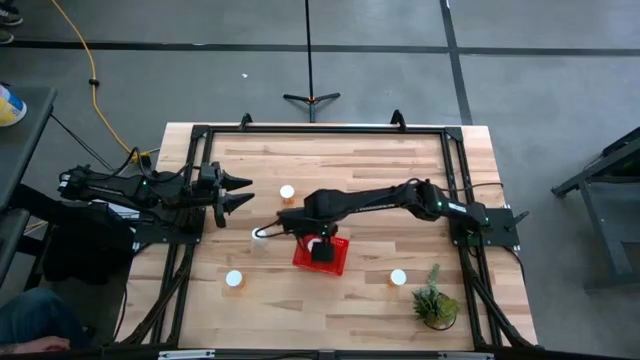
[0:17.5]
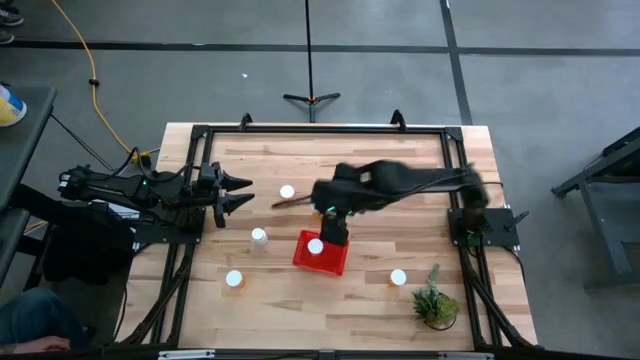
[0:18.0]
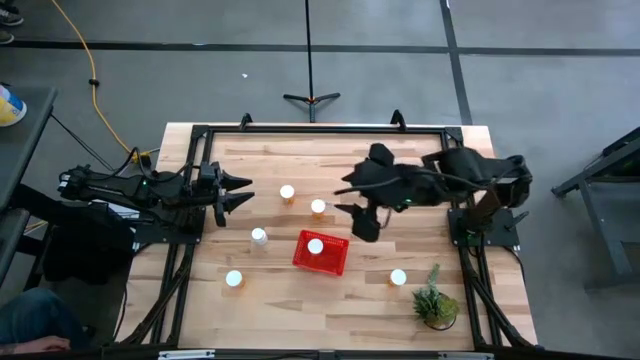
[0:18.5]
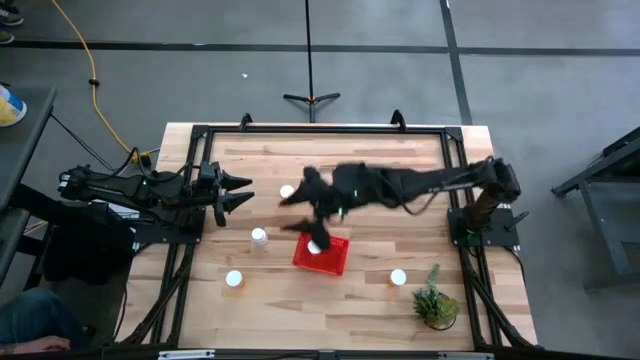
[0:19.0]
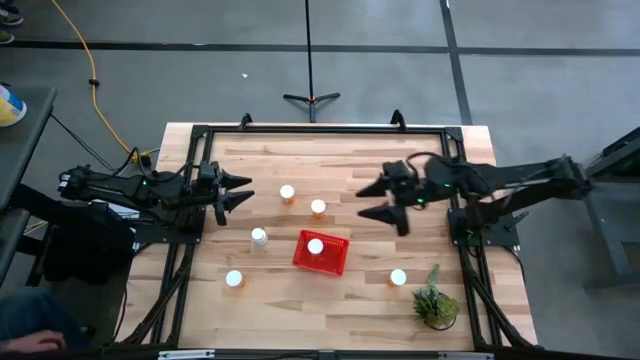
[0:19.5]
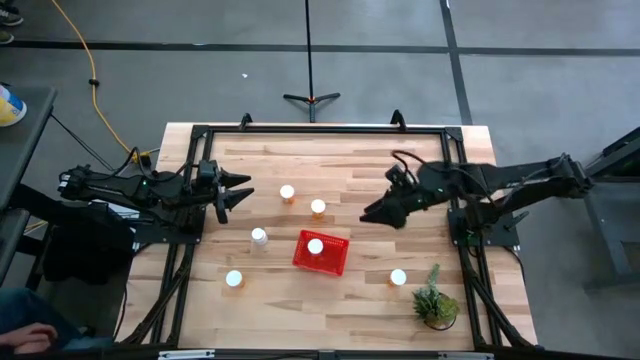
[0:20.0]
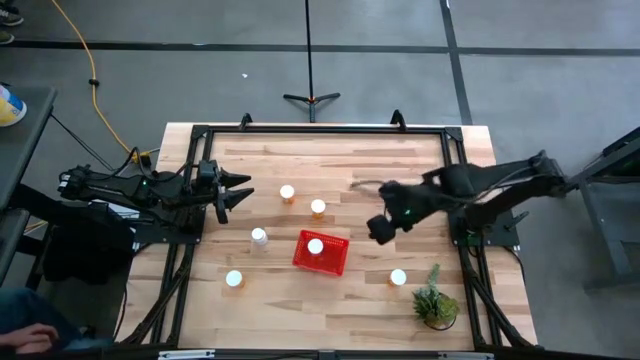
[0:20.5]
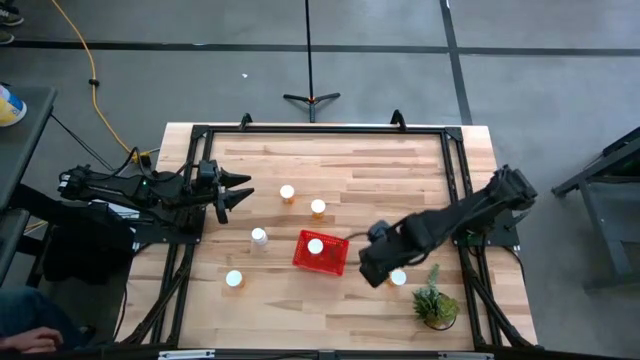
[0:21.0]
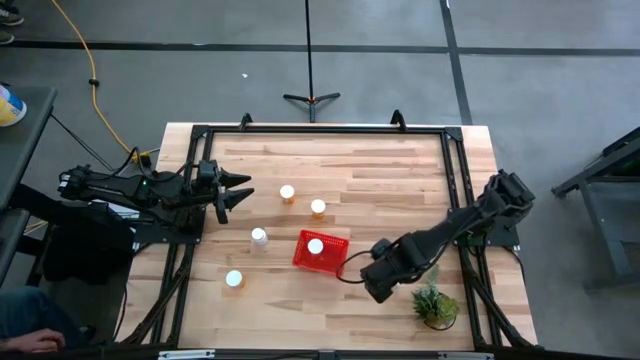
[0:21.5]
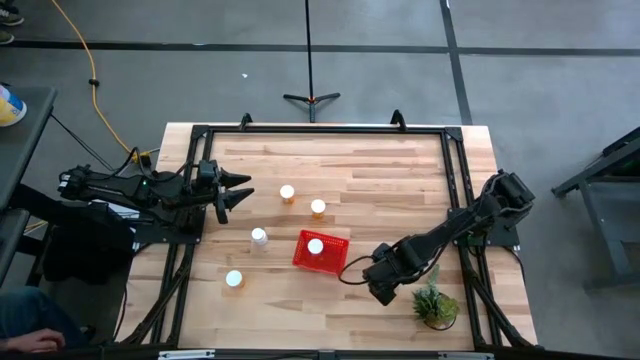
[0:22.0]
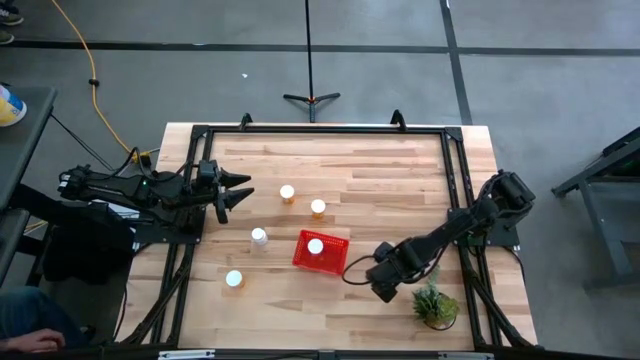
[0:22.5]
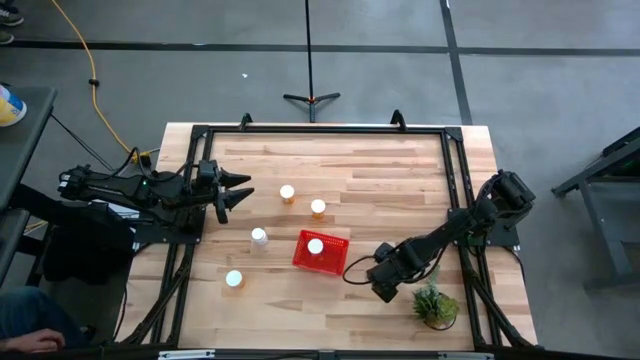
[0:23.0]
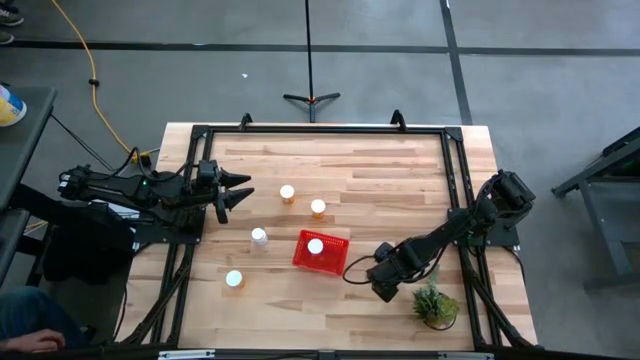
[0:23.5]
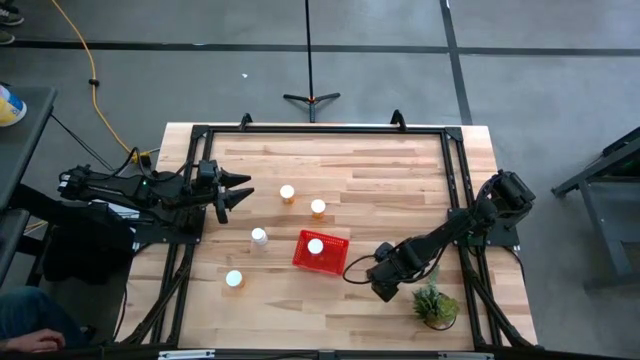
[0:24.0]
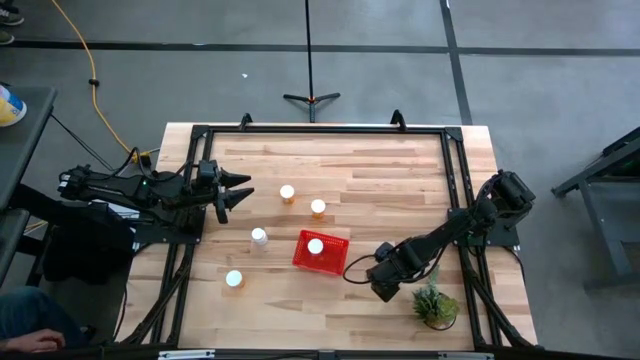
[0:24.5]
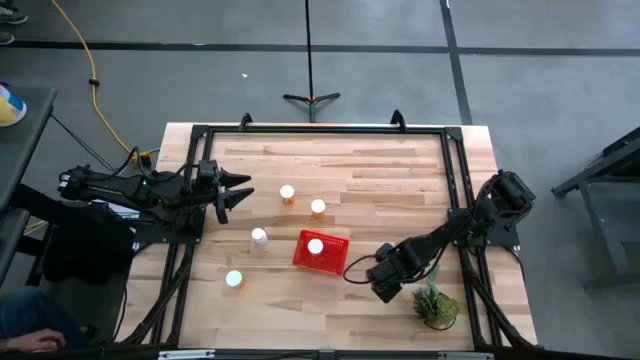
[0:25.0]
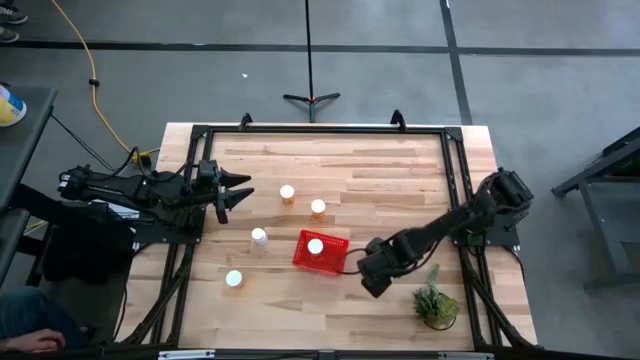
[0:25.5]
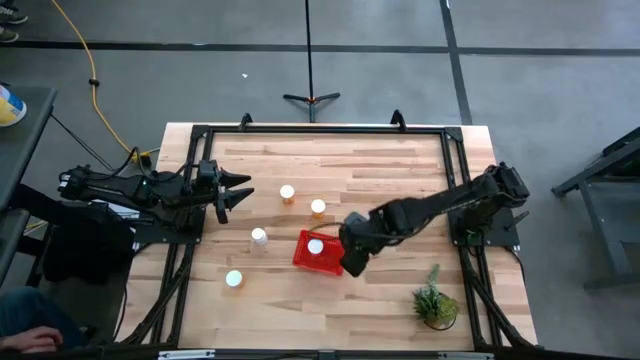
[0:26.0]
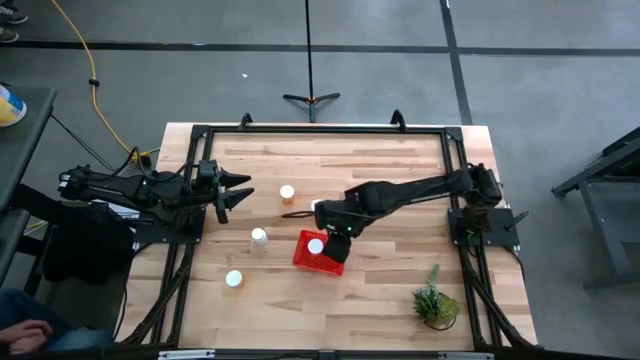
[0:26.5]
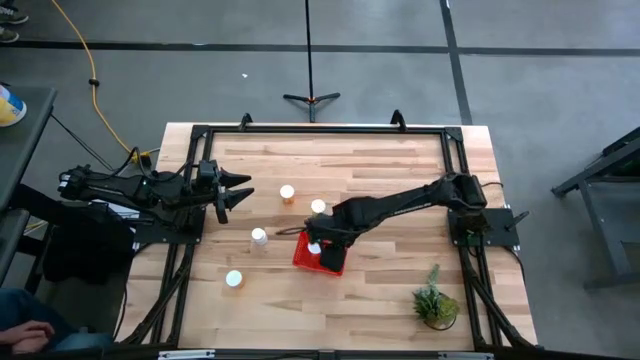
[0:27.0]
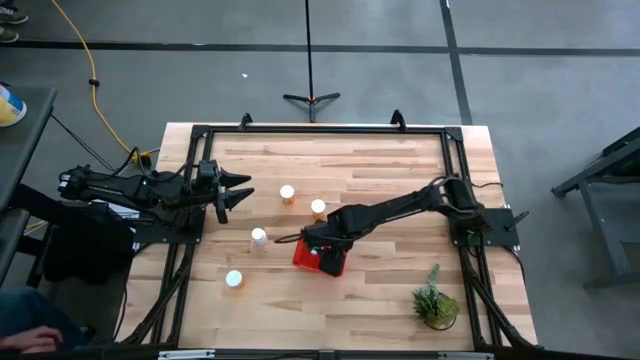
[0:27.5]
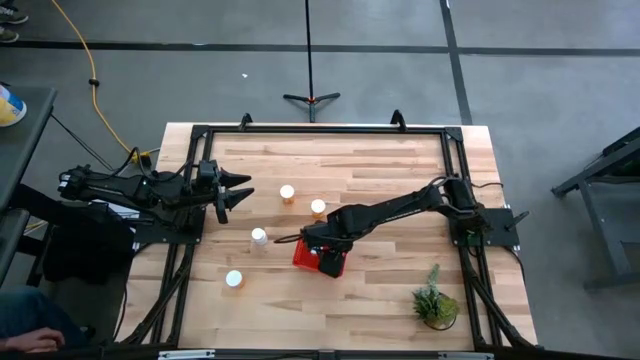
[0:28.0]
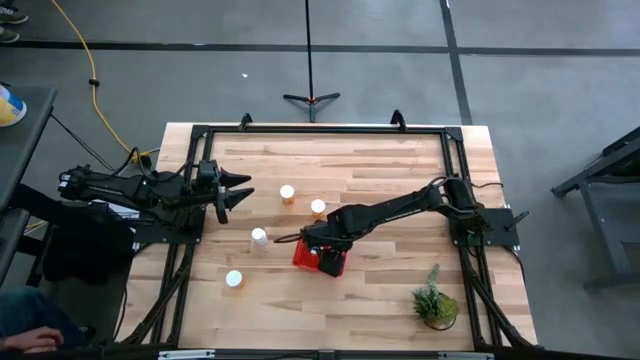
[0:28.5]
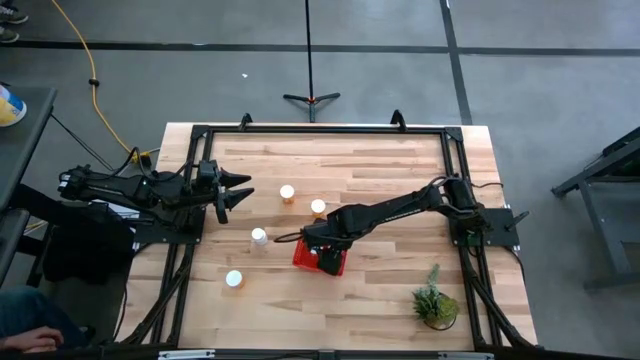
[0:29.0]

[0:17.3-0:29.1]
Task: Pick and place pill bottles into a basket
Put the orange pill bottle into the red bin

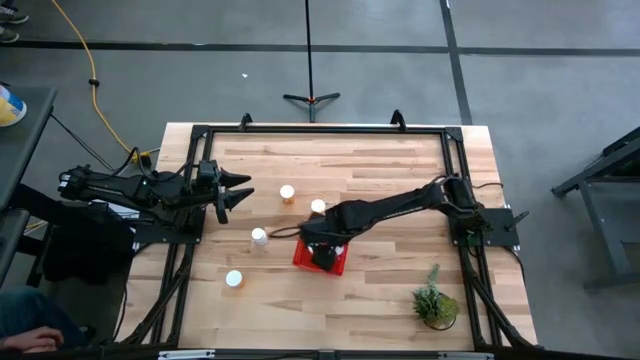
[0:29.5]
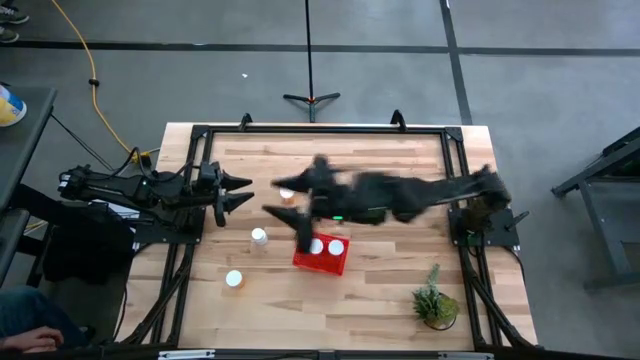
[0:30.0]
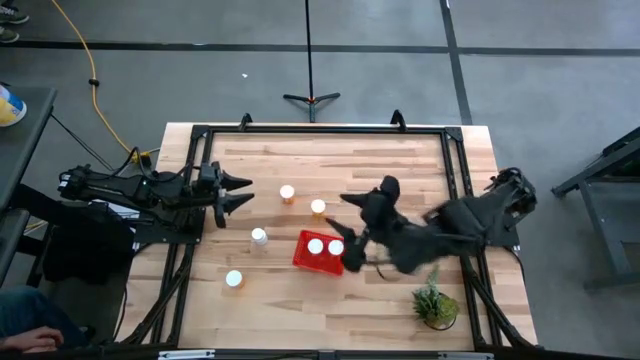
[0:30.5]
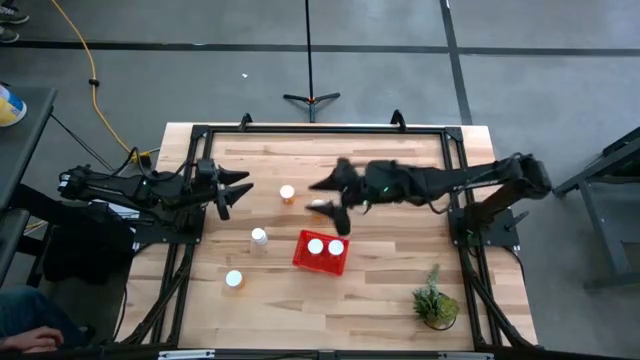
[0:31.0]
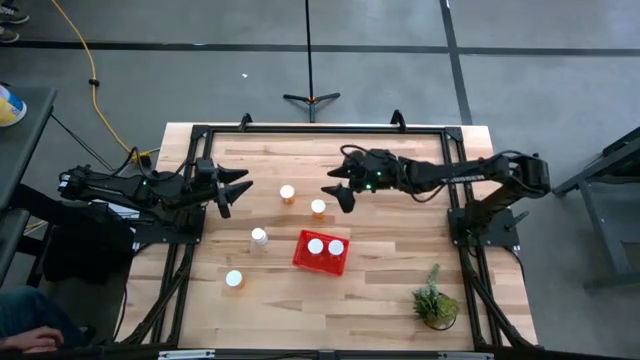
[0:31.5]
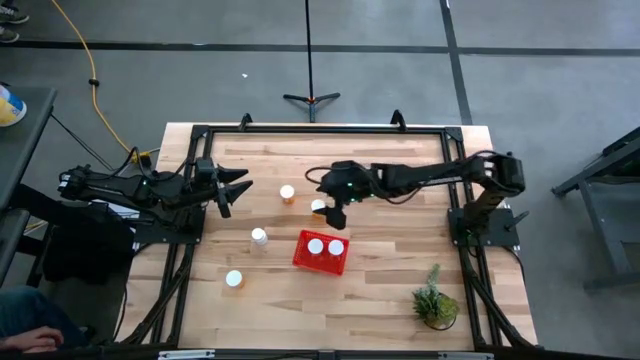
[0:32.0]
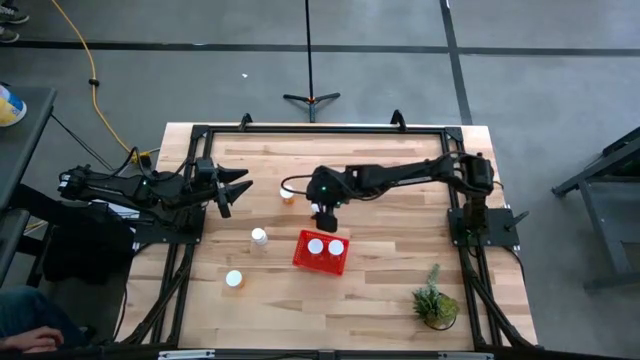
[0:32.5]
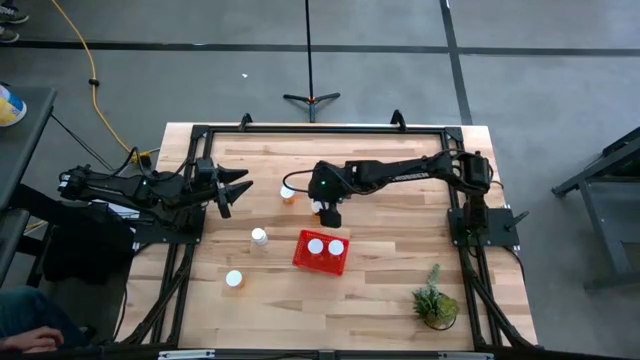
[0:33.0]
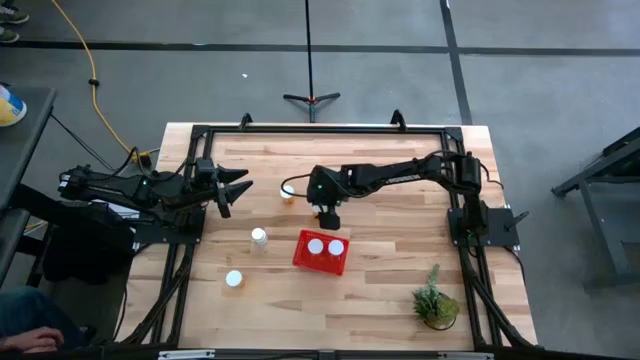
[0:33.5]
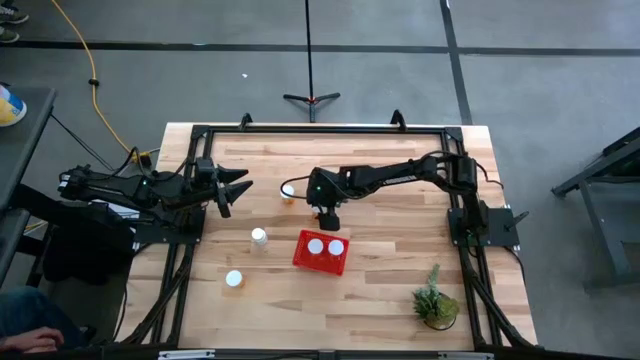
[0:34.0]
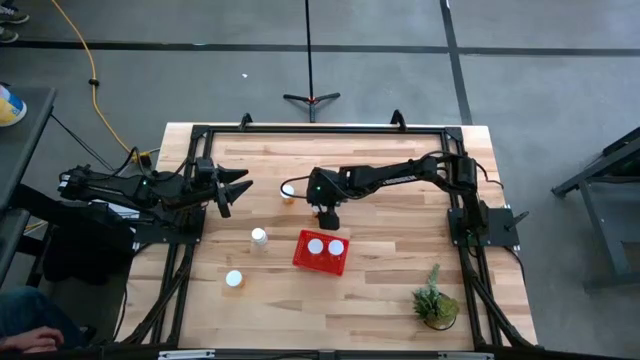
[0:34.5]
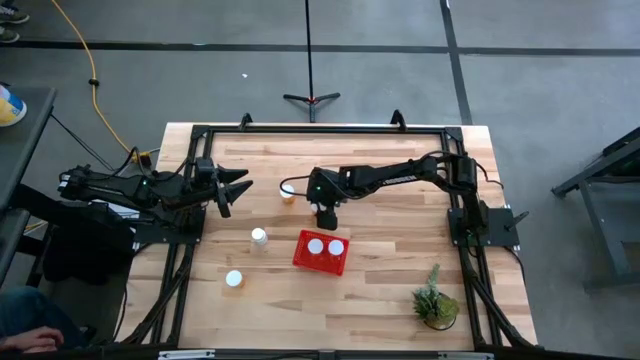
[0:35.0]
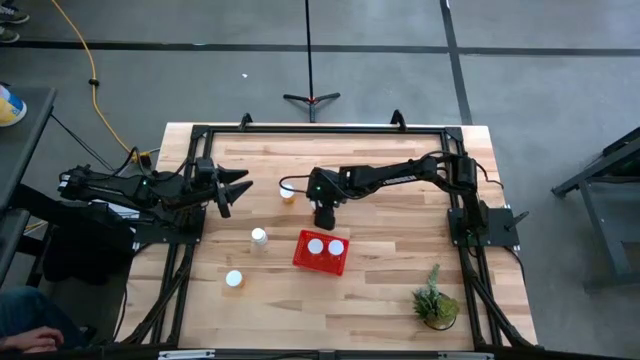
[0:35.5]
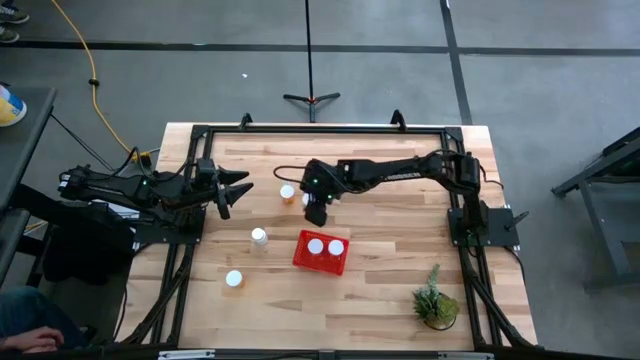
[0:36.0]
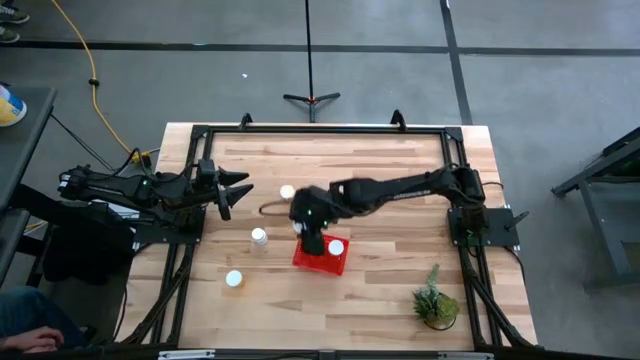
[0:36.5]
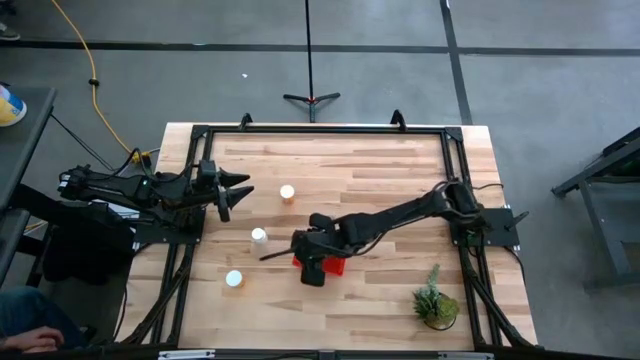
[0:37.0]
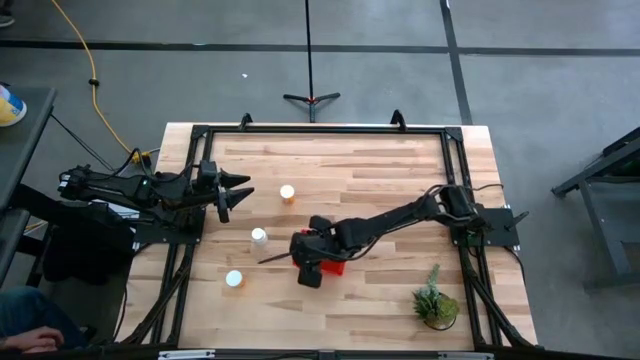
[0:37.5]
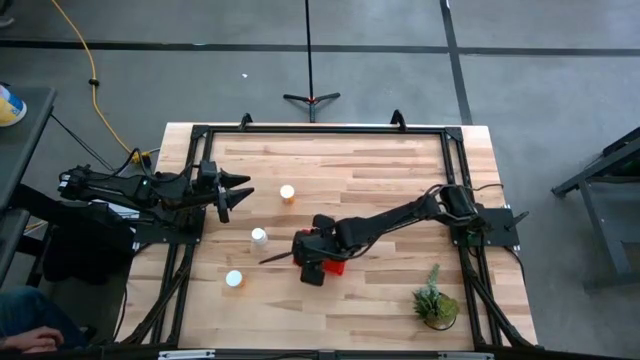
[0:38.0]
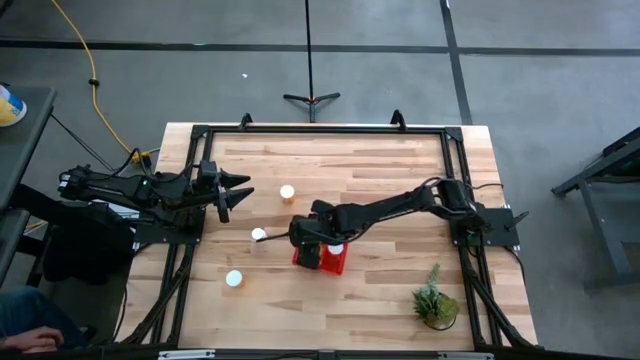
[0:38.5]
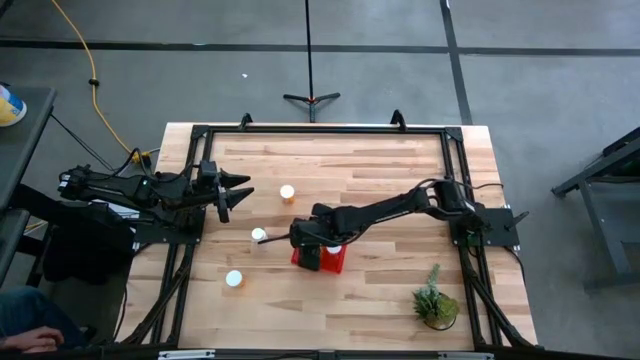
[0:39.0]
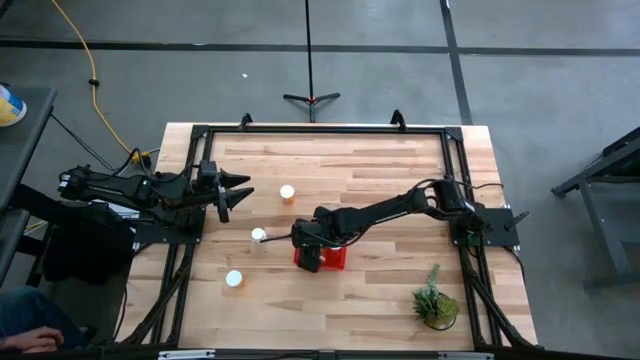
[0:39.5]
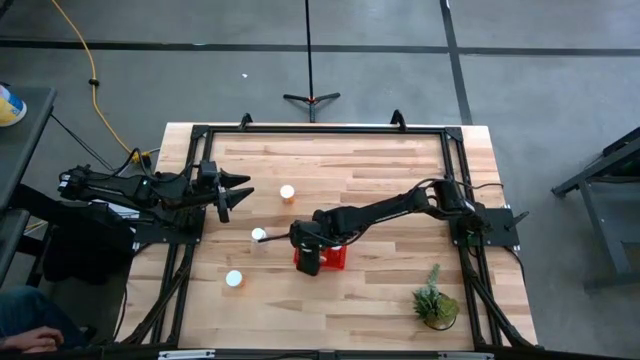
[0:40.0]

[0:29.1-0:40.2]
Put the top right orange pill bottle into the red bin
